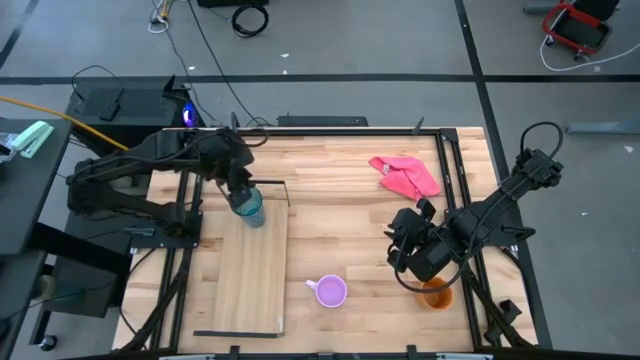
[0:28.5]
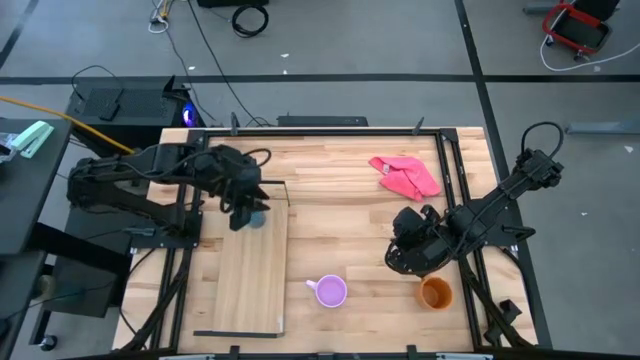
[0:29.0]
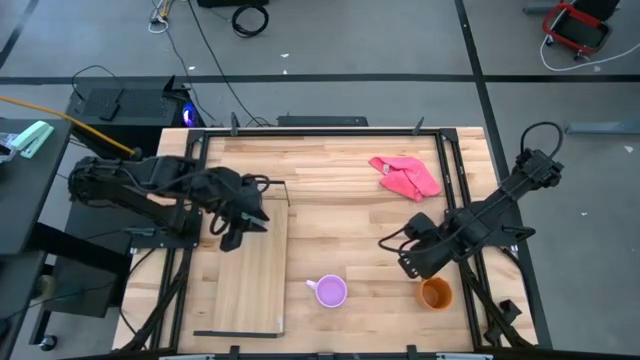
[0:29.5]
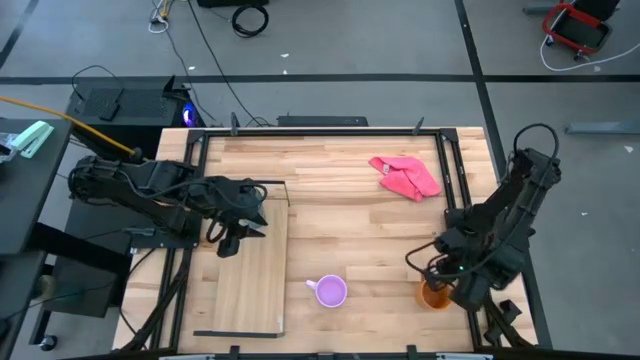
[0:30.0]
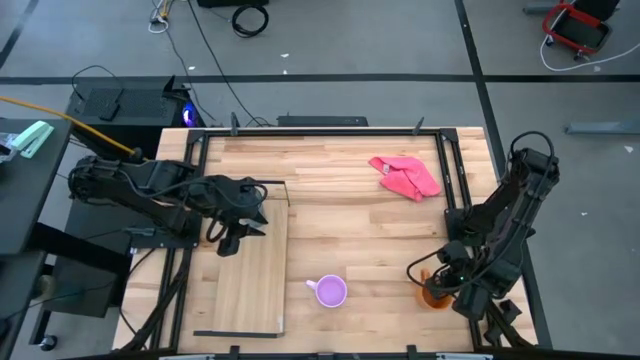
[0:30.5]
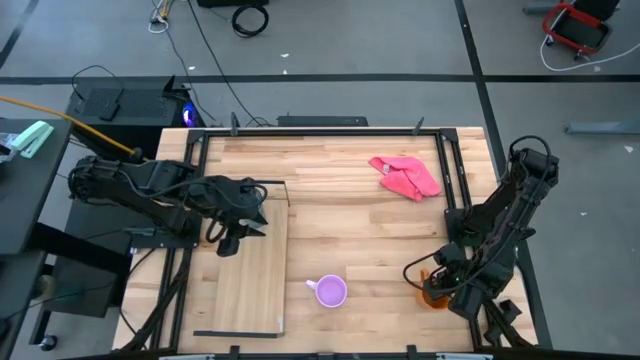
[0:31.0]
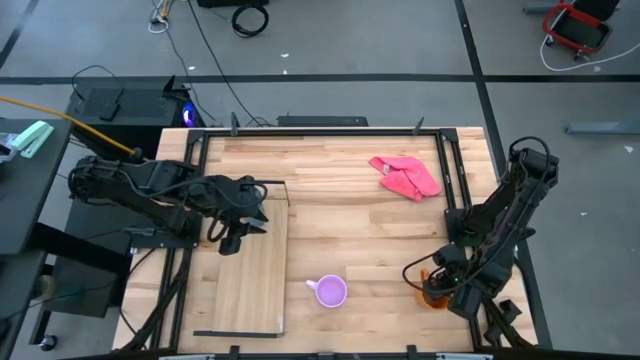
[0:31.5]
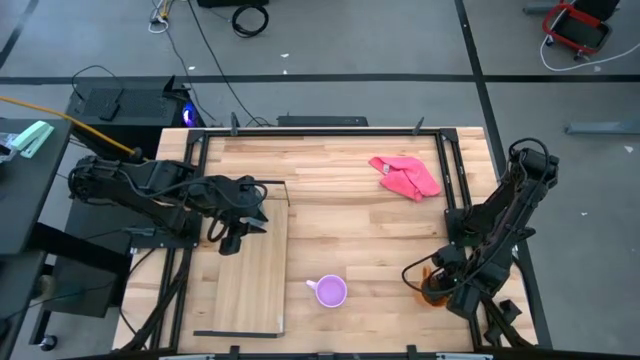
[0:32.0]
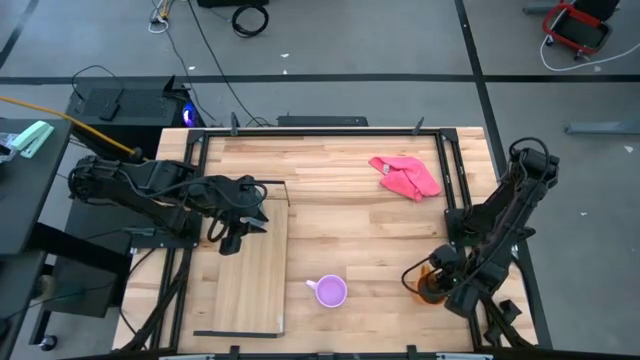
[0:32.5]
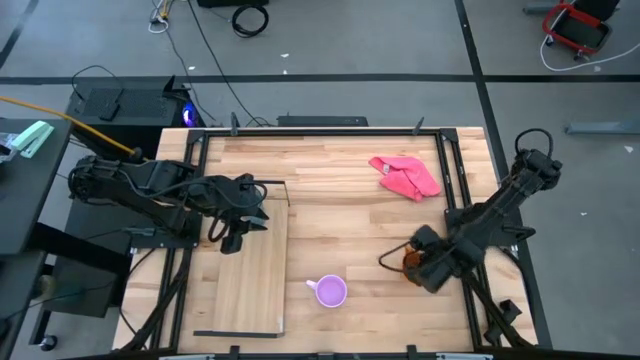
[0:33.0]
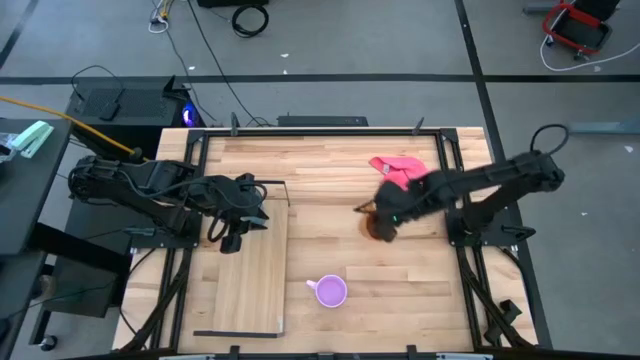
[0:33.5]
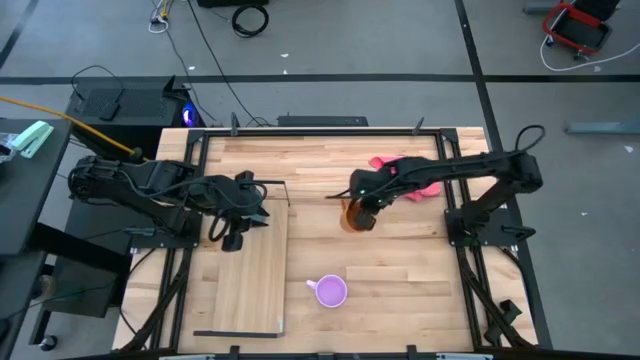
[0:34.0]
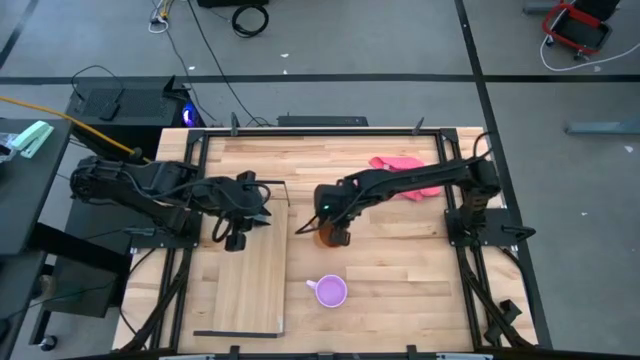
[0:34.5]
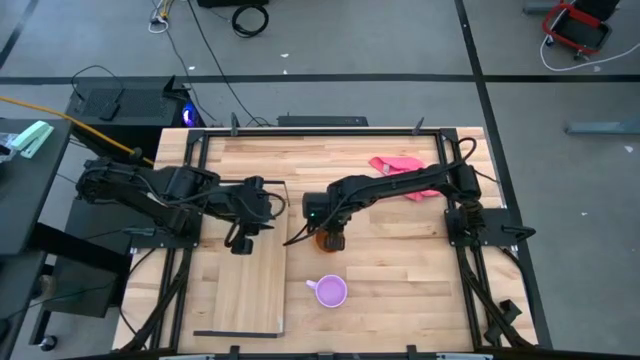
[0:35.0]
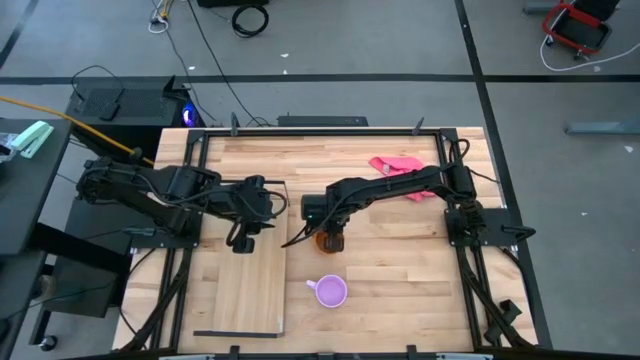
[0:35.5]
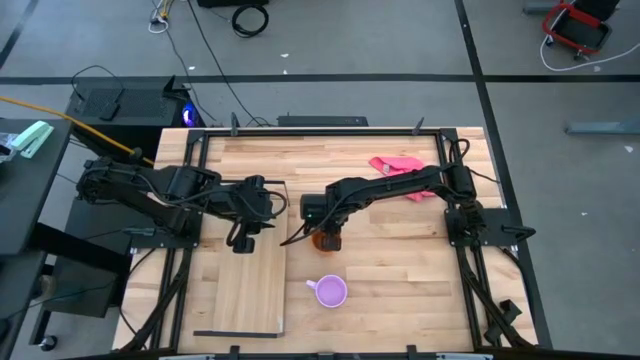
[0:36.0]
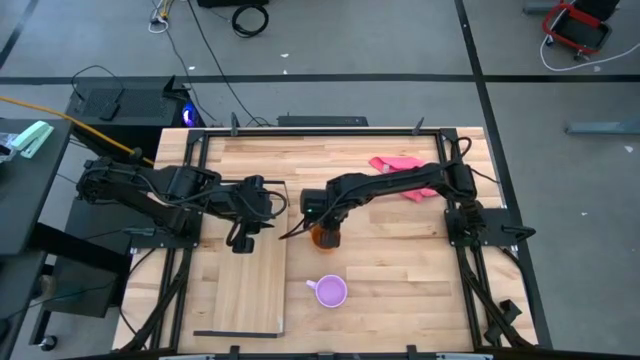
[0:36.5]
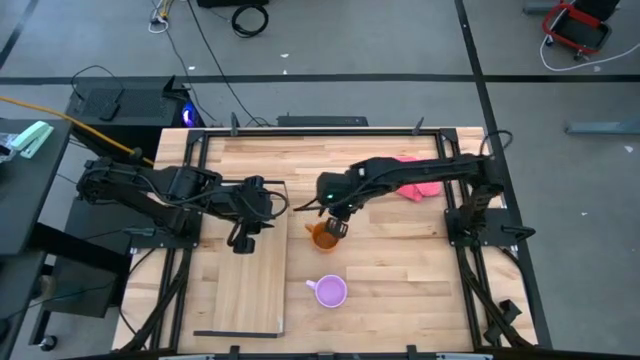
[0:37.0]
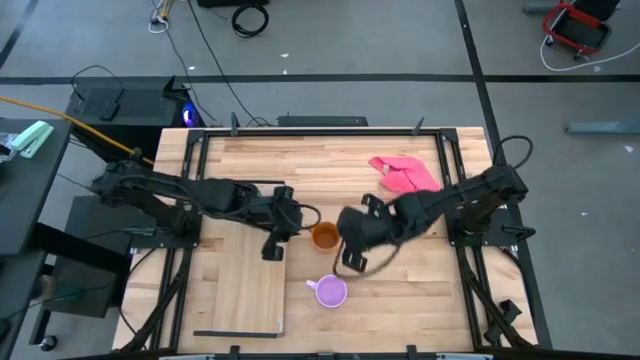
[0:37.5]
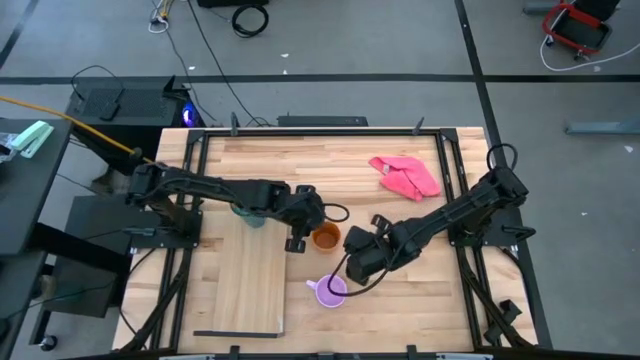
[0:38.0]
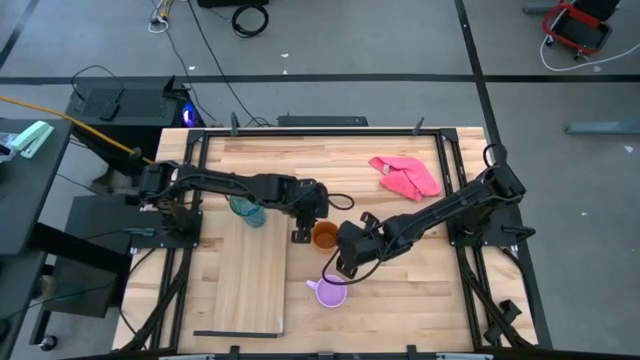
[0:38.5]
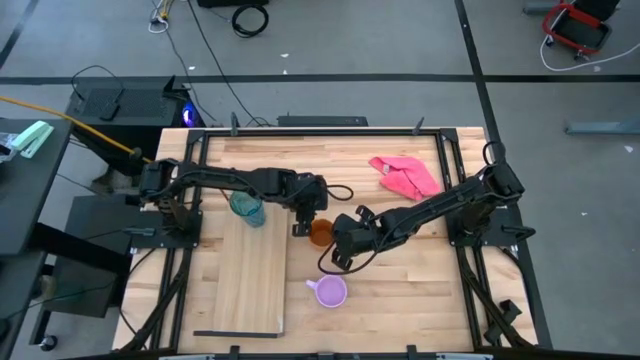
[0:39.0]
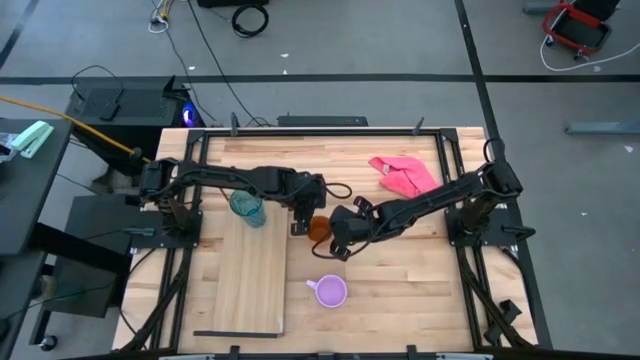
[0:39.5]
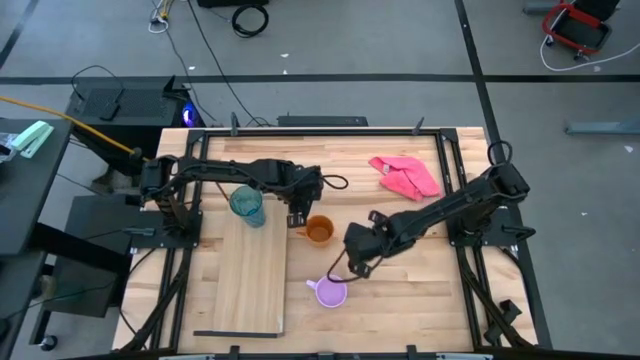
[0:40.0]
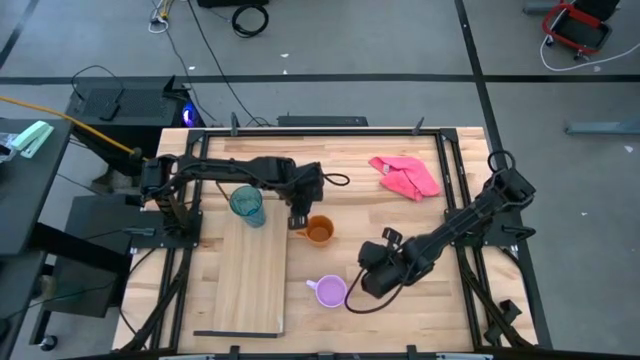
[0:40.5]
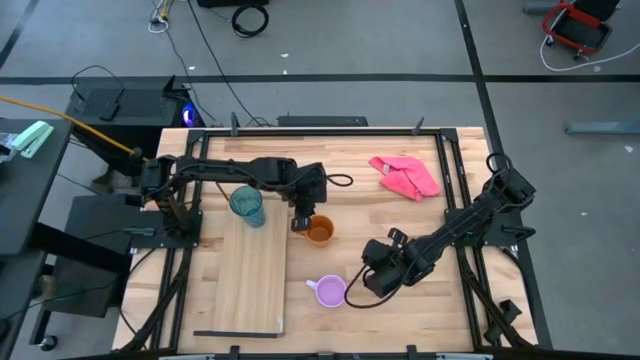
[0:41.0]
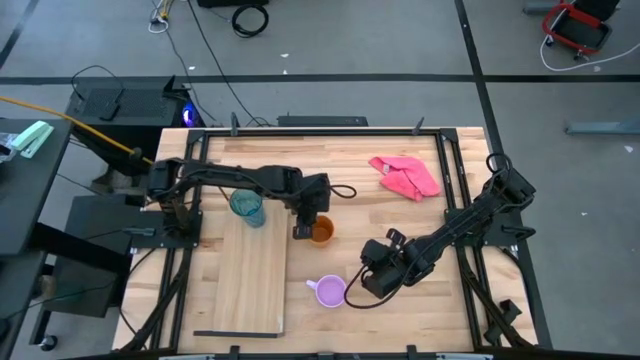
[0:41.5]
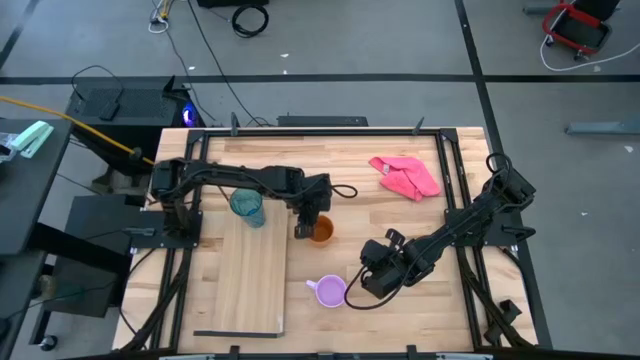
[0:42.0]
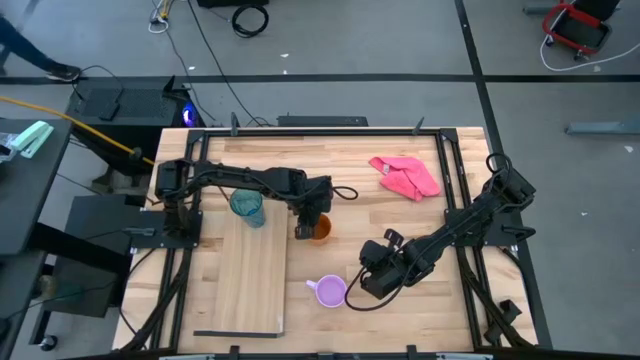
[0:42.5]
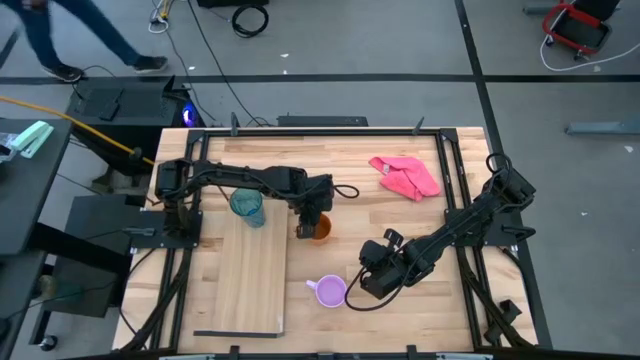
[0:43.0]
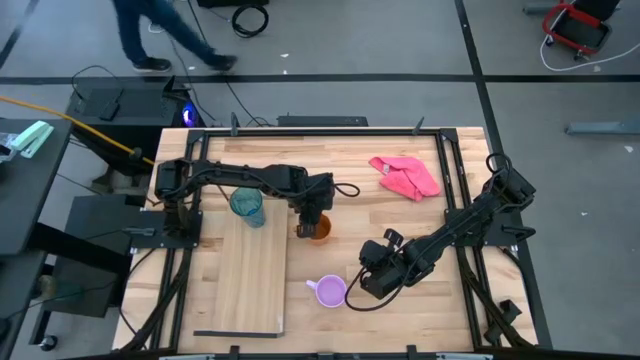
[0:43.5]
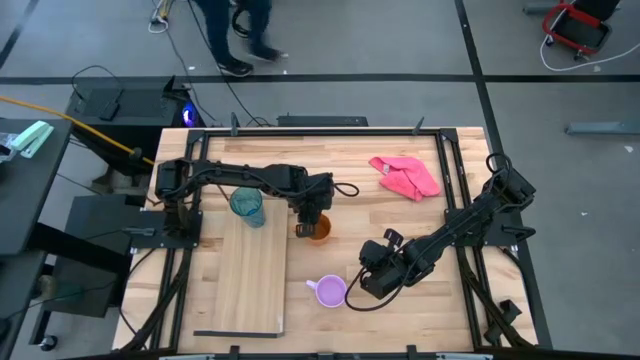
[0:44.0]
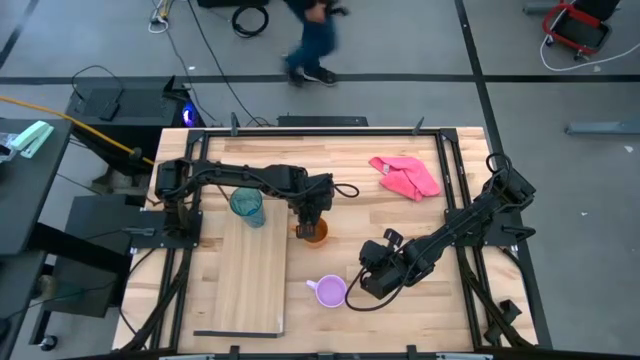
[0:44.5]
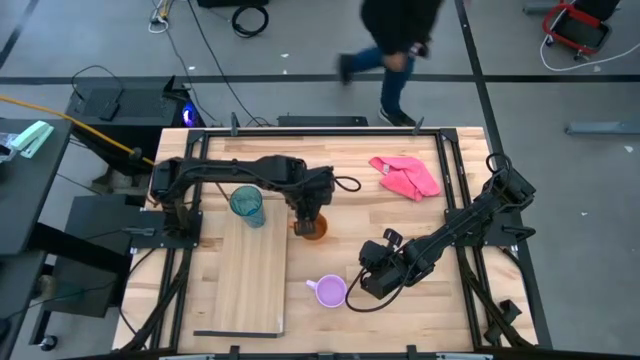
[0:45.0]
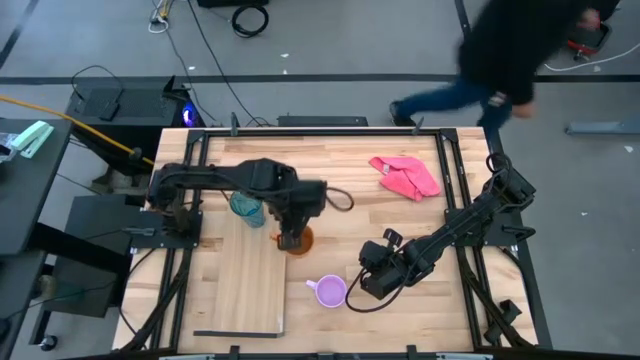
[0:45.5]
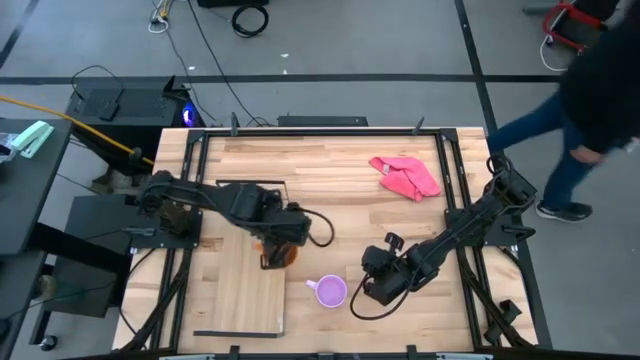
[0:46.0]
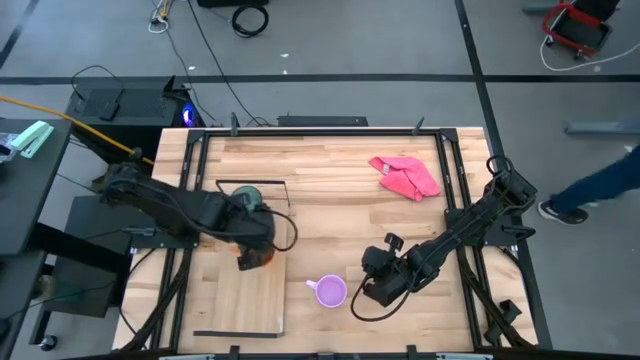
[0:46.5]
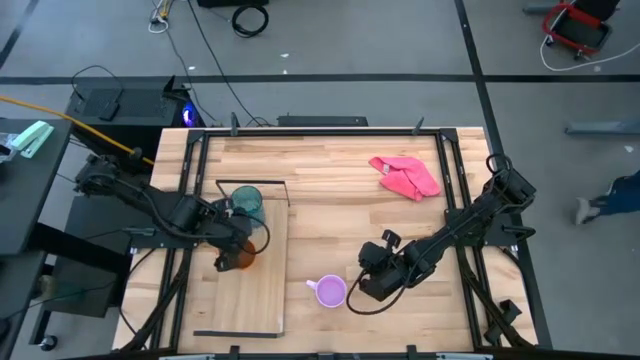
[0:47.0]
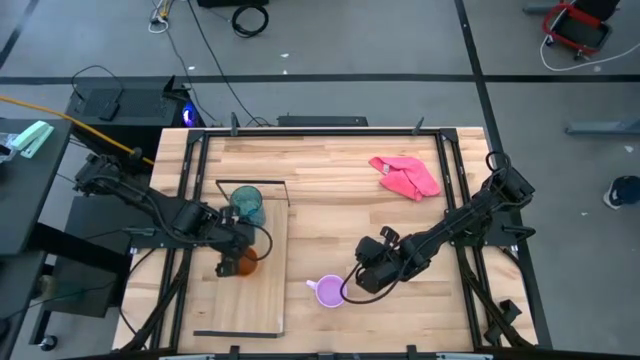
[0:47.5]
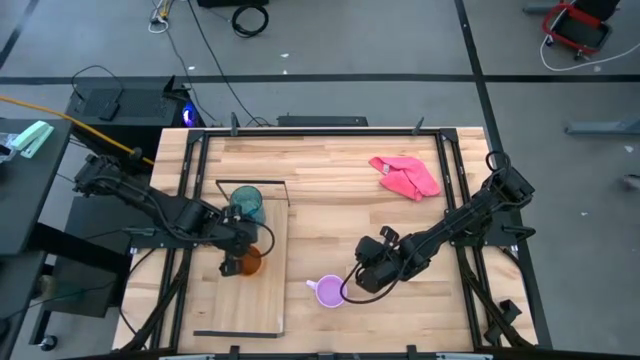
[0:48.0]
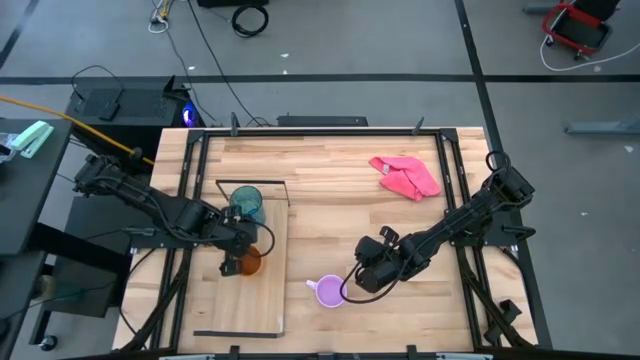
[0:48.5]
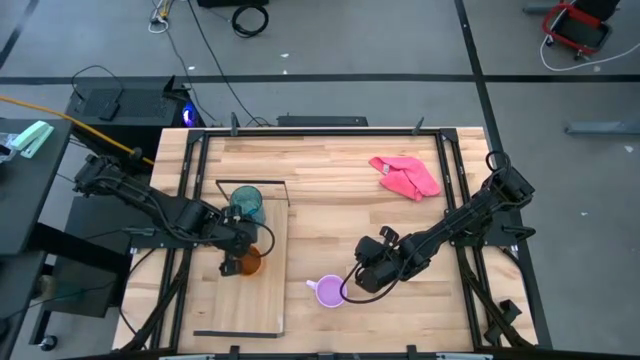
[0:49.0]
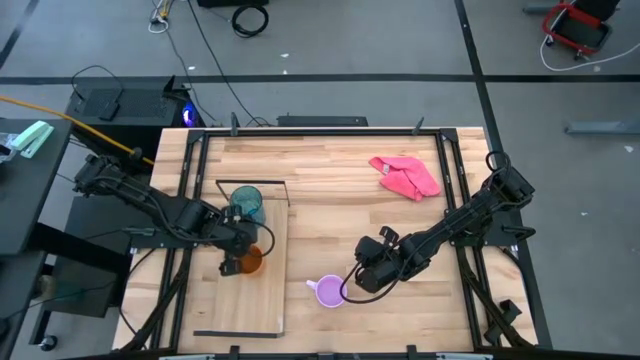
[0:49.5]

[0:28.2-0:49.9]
Task: Stack small to large cups/mugs on shelf
Put the orange mug on the shelf
